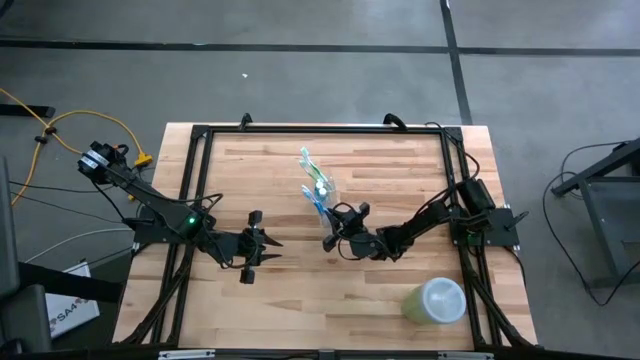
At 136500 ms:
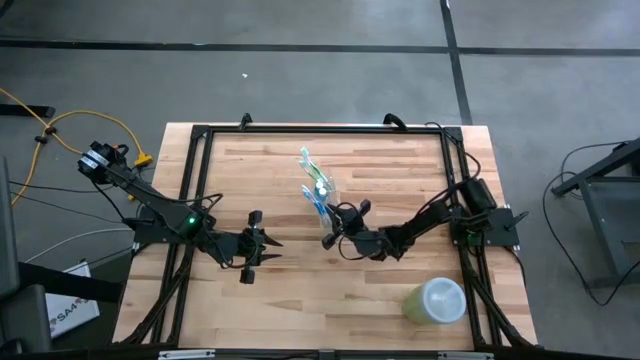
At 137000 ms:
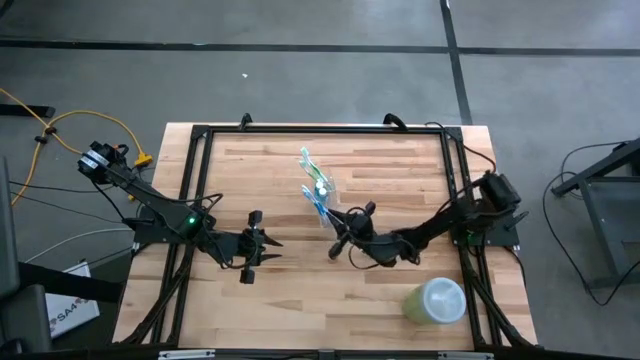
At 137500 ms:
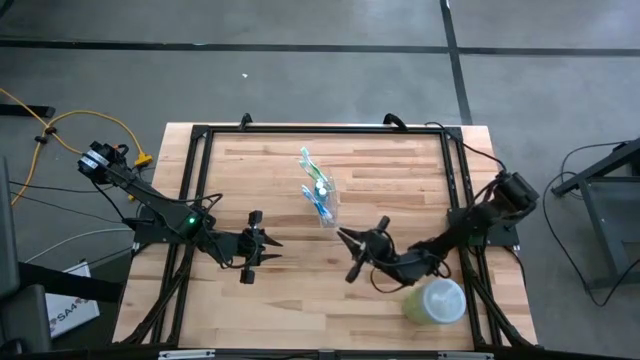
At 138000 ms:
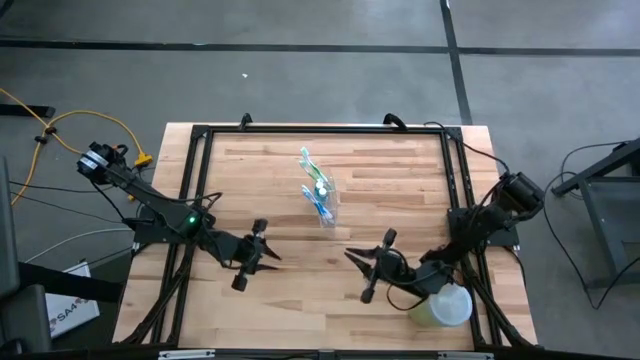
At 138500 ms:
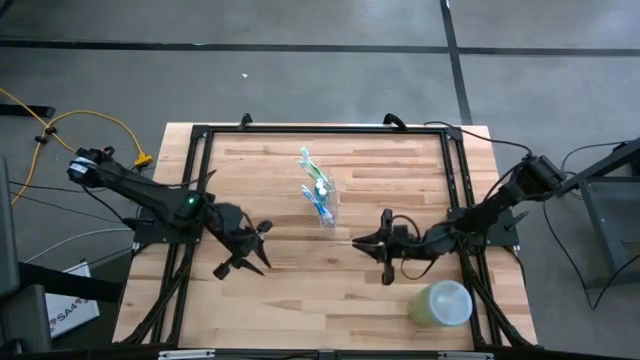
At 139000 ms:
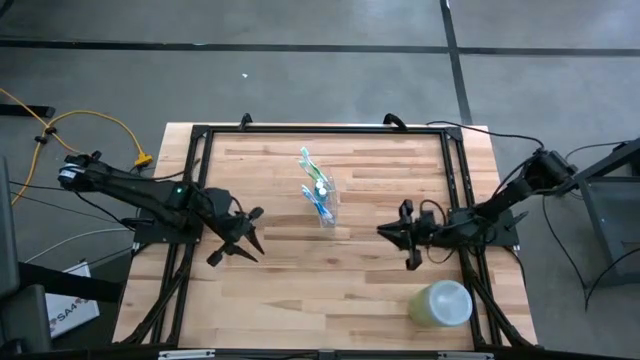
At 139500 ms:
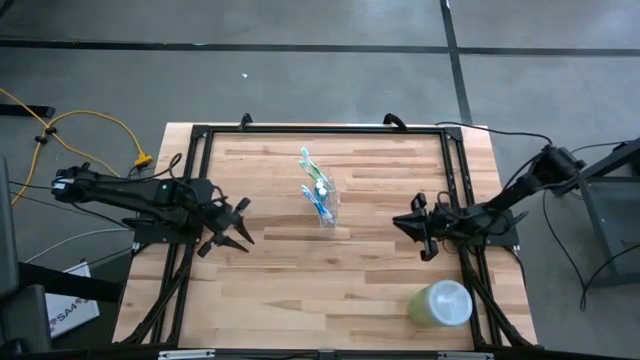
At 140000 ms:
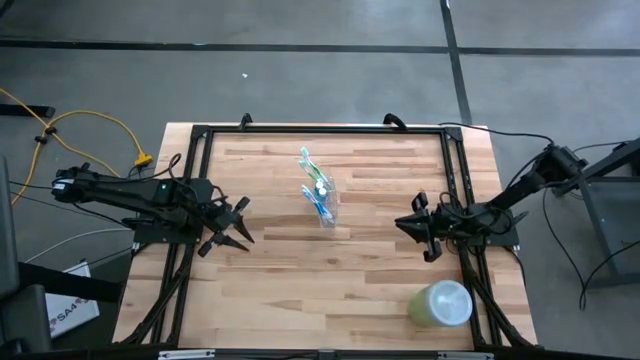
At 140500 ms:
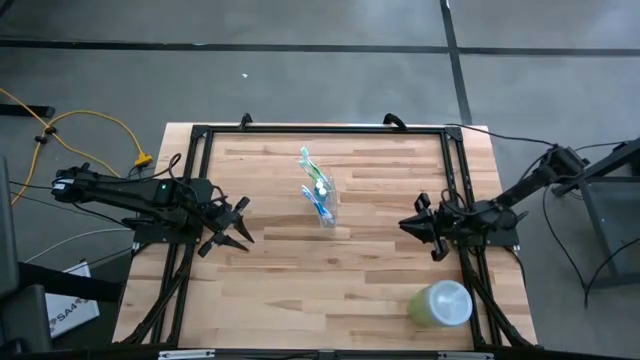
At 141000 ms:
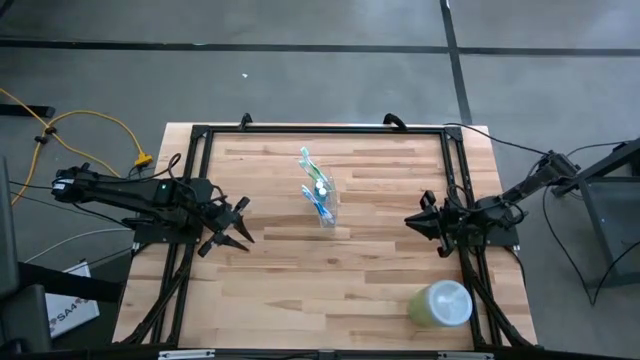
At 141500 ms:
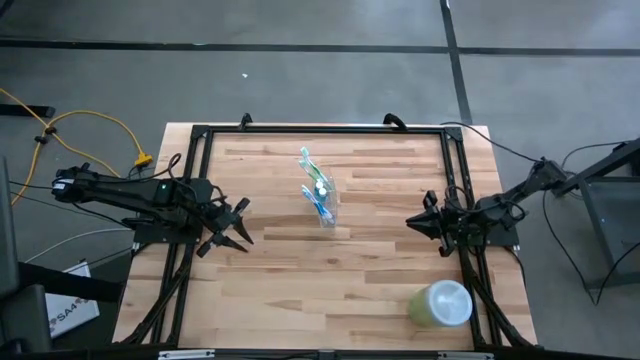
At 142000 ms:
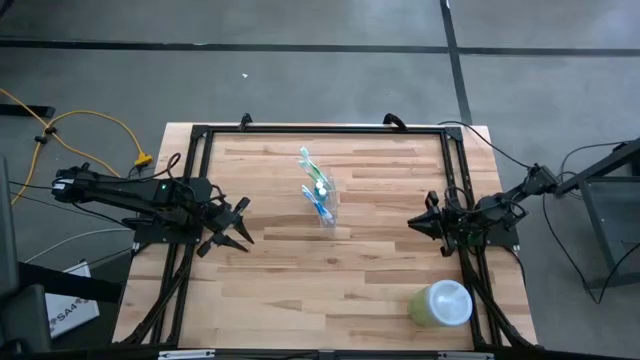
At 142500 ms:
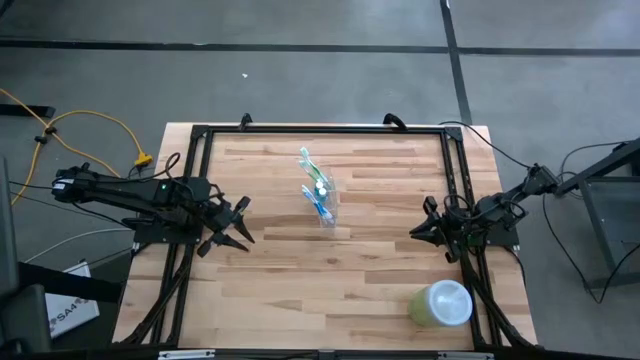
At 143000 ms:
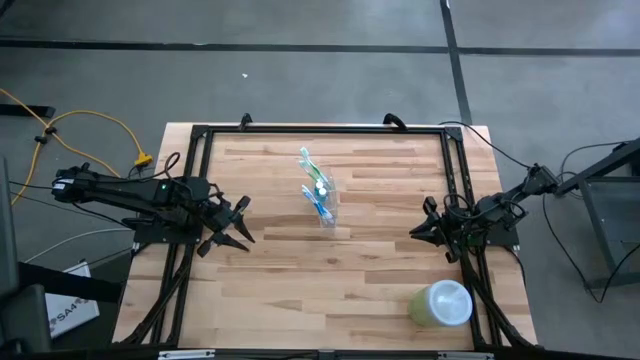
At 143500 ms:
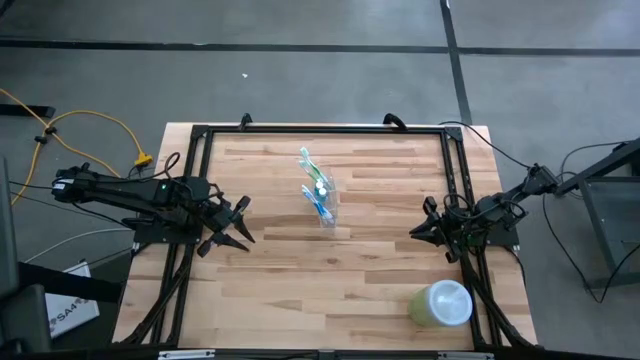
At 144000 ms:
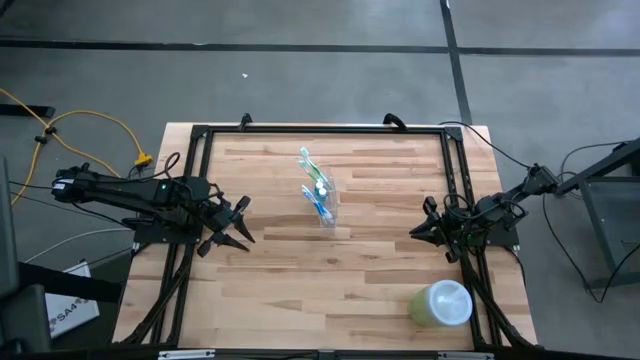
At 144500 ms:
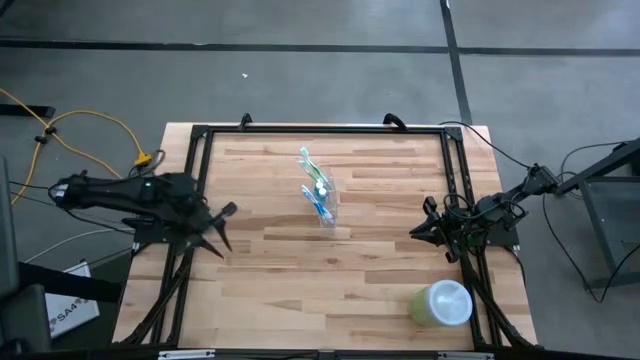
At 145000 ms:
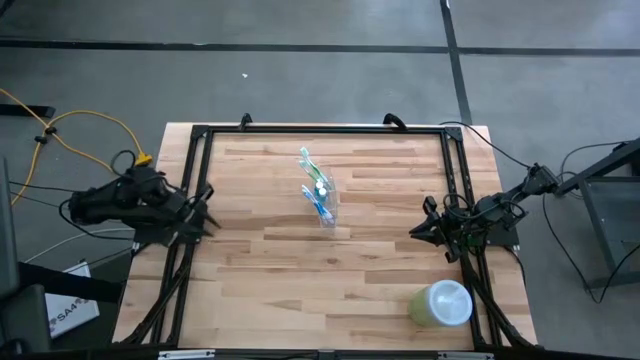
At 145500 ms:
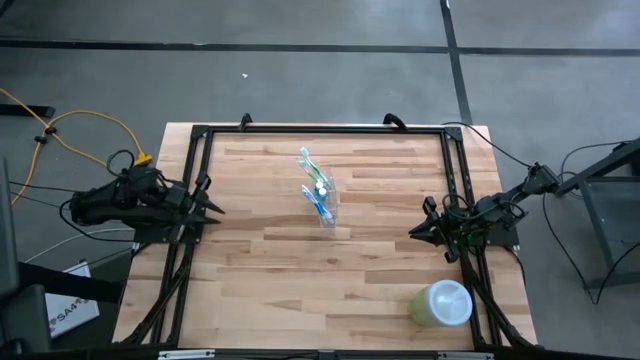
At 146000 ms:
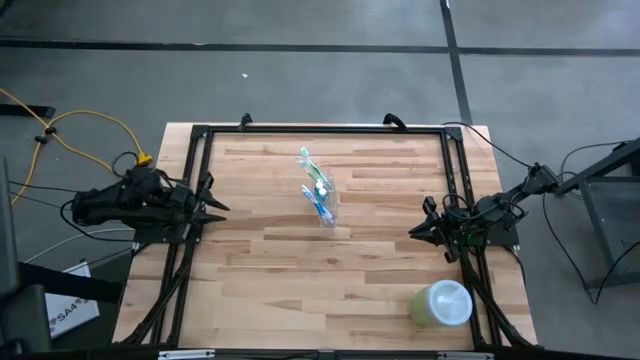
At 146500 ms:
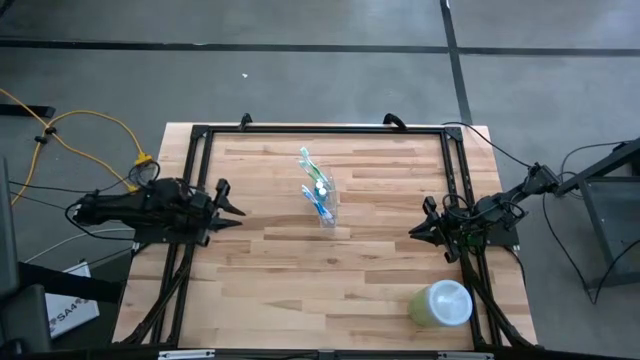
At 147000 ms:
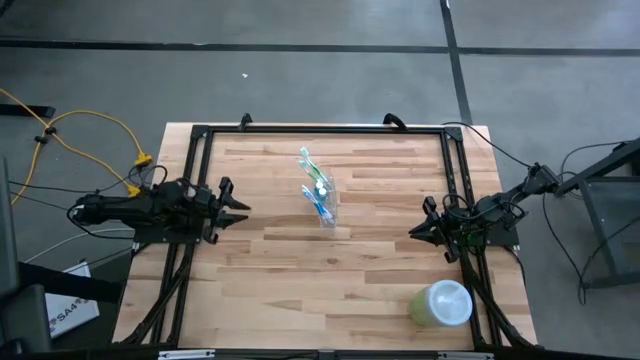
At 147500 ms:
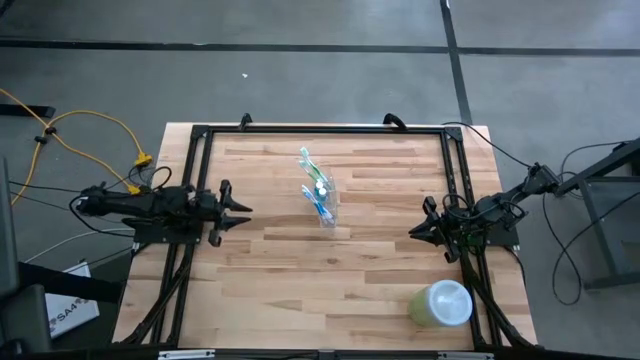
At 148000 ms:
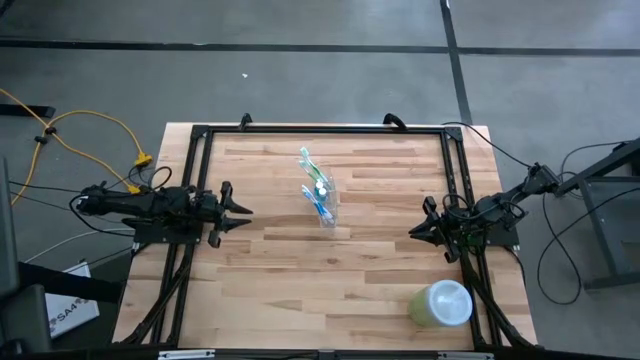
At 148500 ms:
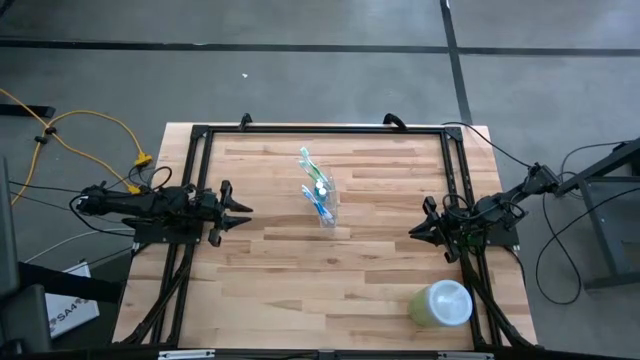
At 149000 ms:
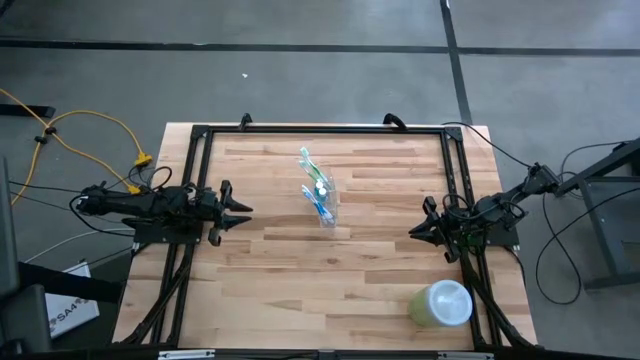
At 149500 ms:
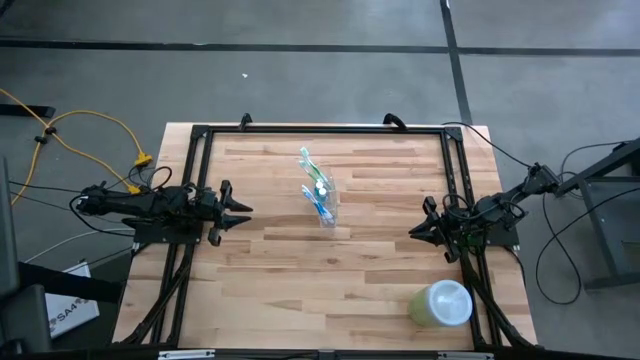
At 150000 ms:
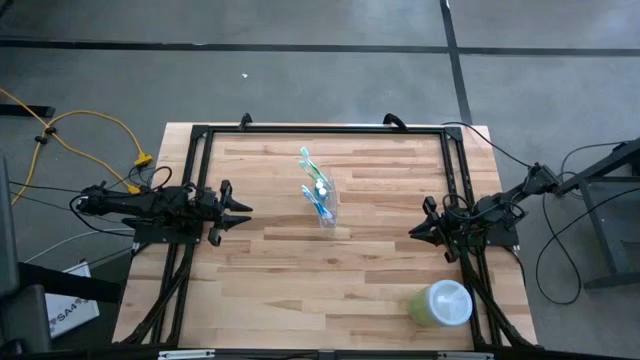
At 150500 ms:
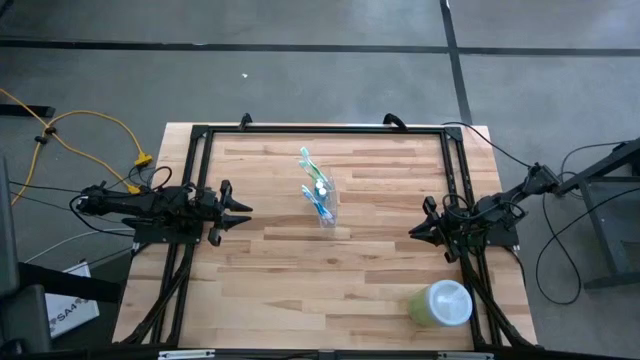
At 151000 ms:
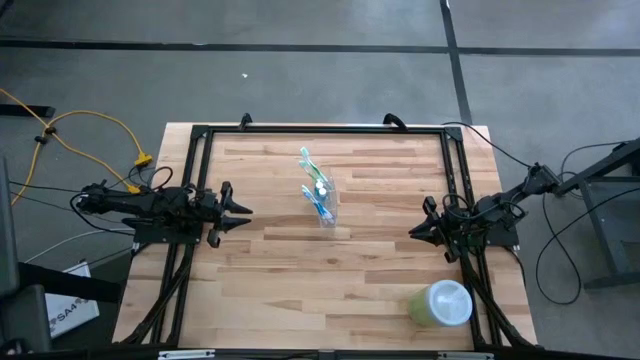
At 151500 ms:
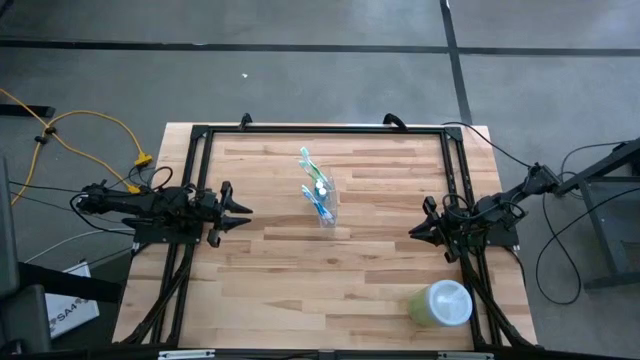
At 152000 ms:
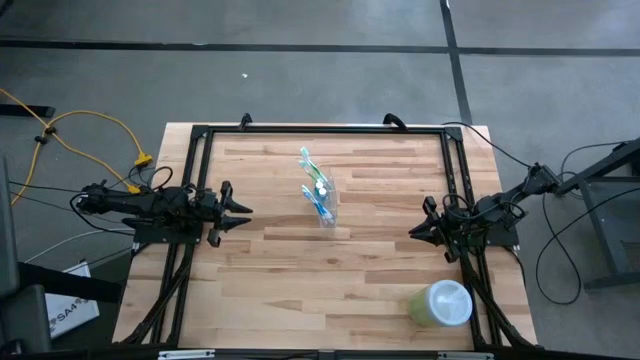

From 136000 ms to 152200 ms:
Task: Pick & Place toothbrushing station
Return to Home Position

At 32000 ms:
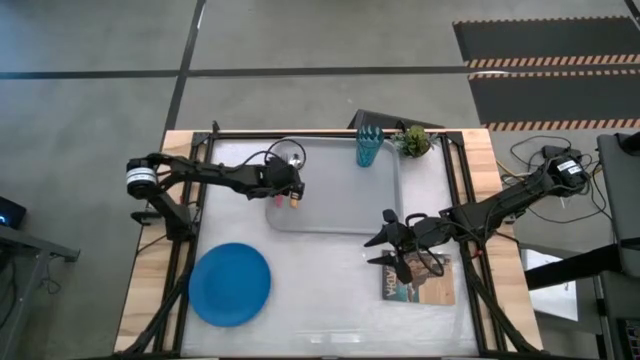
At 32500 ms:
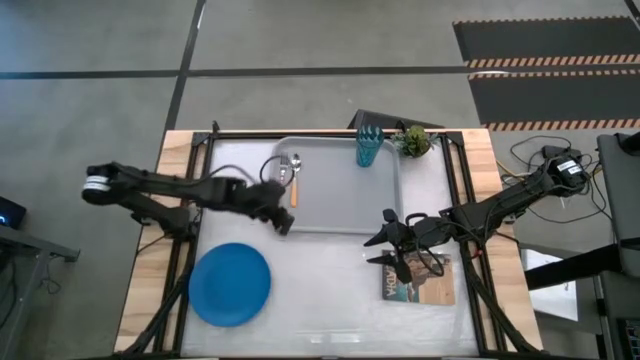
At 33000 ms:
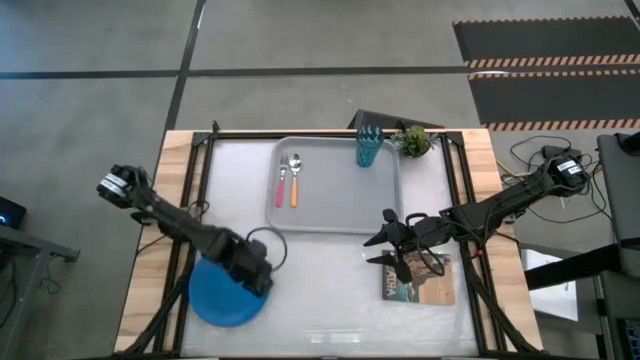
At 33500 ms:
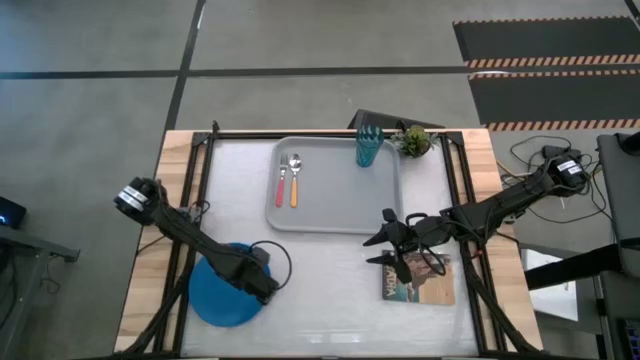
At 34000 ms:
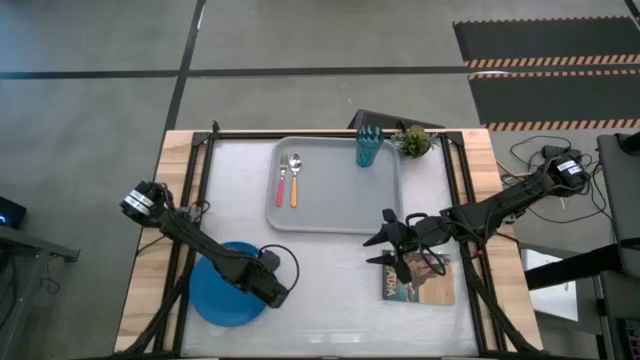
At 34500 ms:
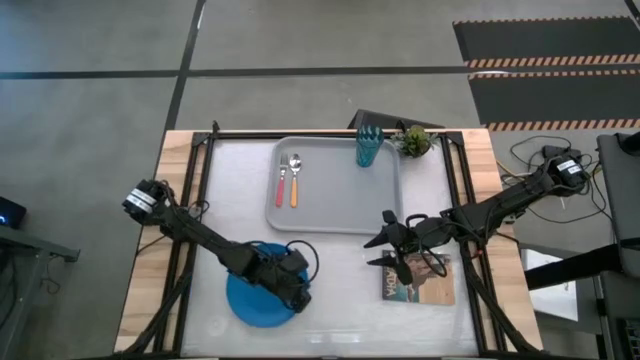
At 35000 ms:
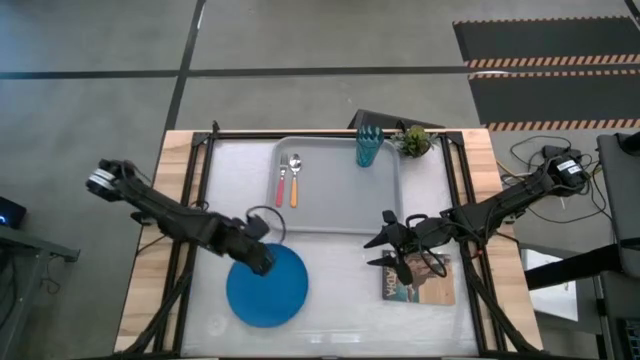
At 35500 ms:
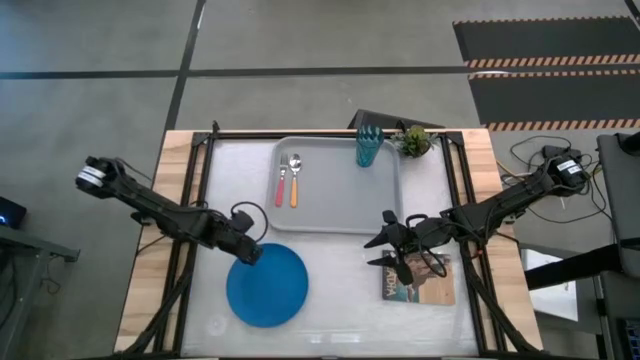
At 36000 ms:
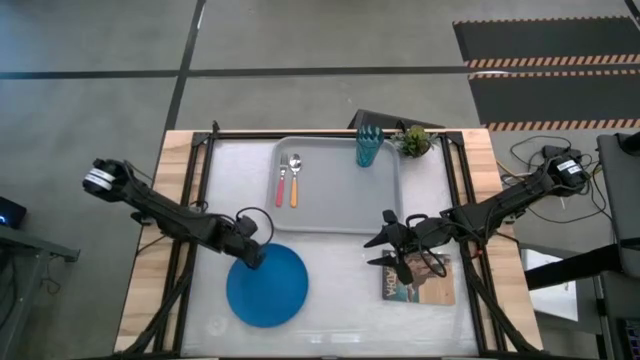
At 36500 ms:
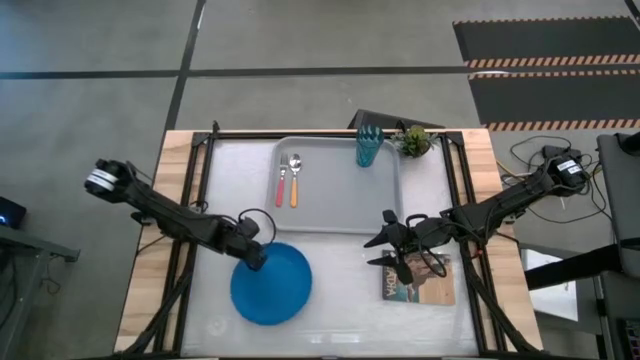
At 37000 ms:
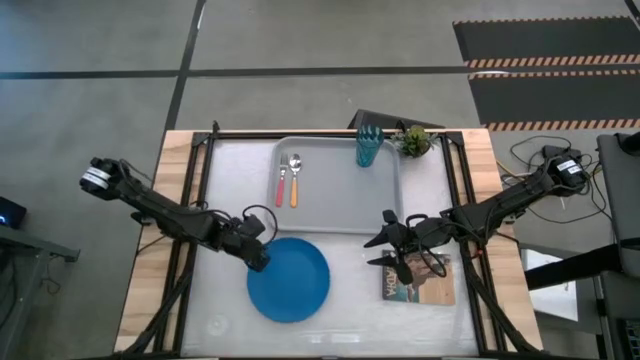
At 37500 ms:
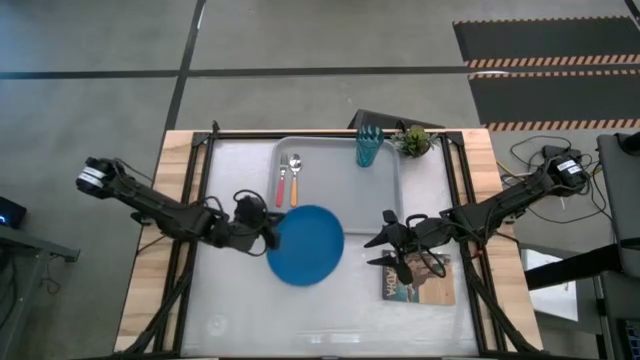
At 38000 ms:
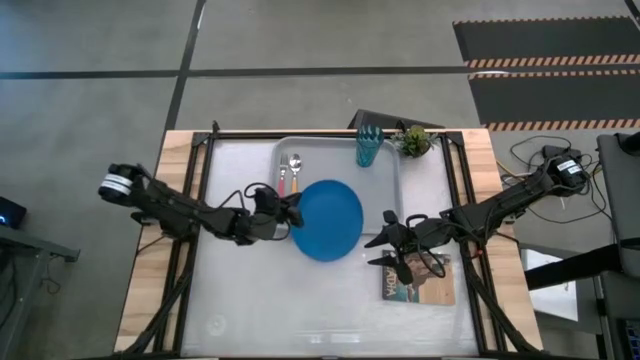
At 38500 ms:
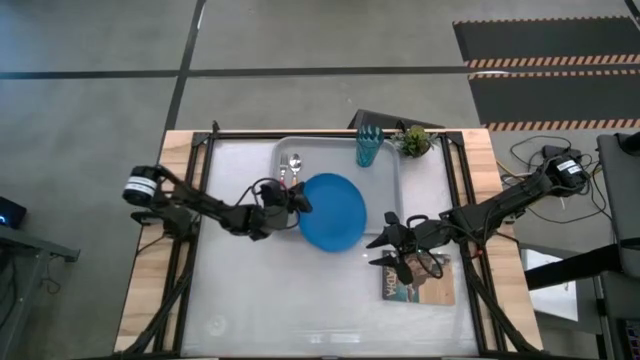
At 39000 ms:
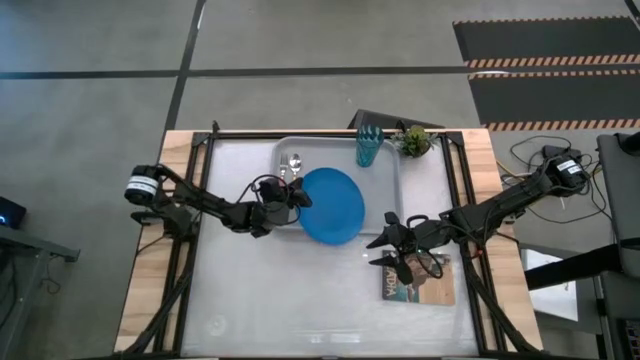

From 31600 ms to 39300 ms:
Task: Pick and place plate/cup/fork/spoon on tray
Put the blue plate on the tray to the right side of the yellow spoon
